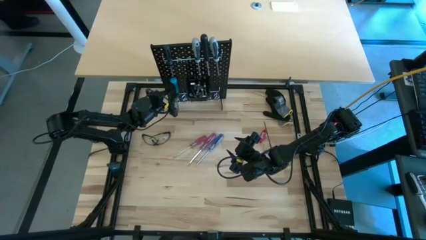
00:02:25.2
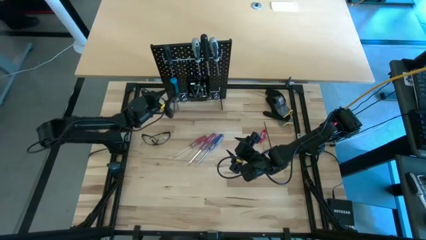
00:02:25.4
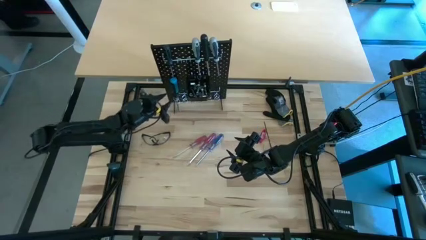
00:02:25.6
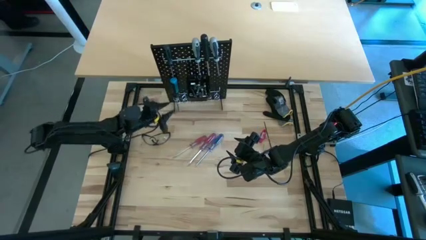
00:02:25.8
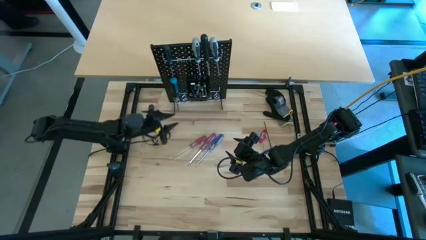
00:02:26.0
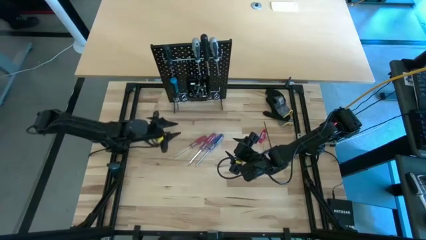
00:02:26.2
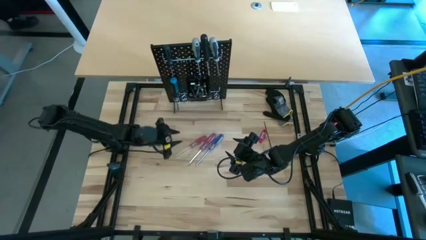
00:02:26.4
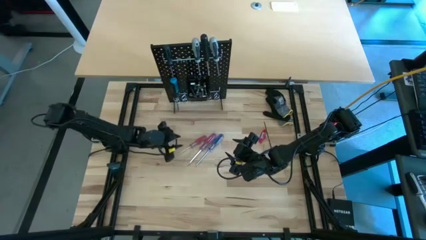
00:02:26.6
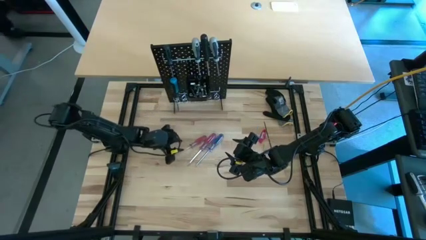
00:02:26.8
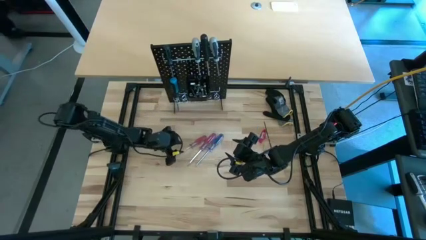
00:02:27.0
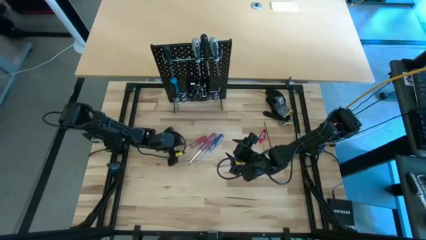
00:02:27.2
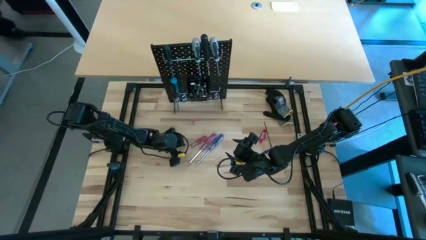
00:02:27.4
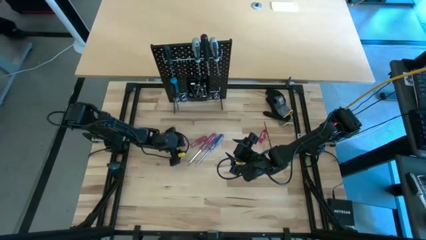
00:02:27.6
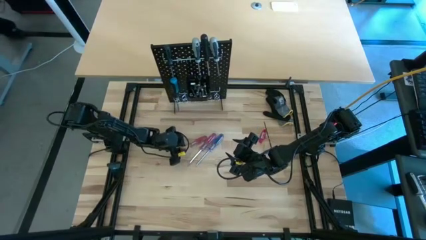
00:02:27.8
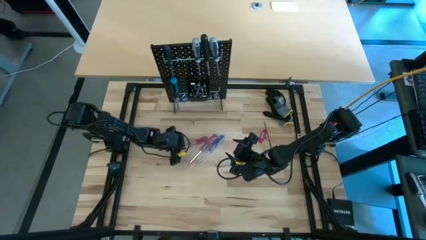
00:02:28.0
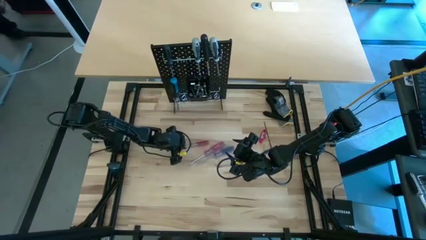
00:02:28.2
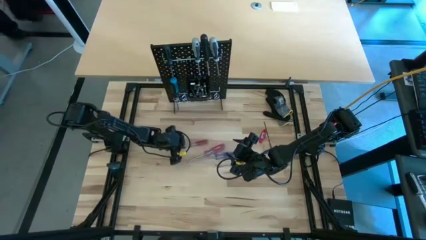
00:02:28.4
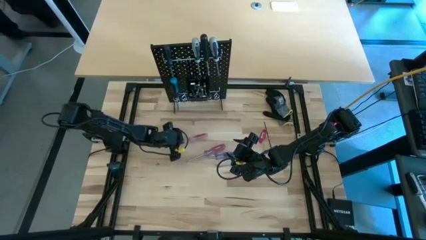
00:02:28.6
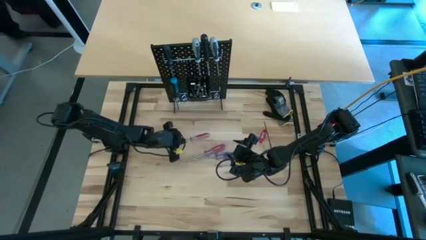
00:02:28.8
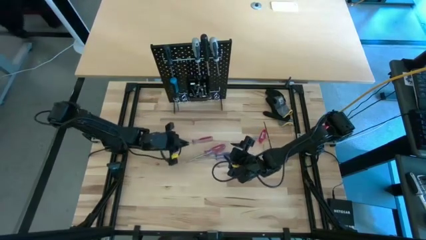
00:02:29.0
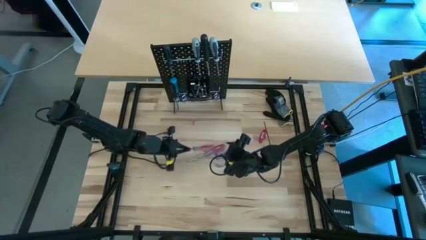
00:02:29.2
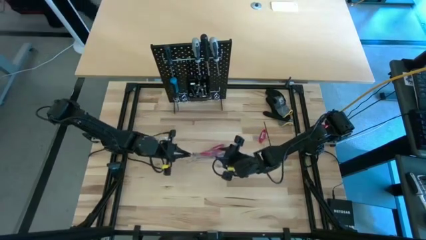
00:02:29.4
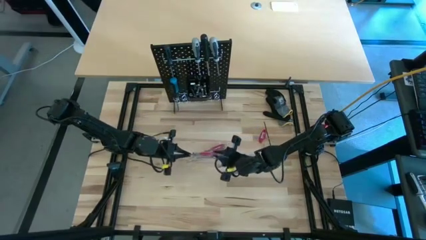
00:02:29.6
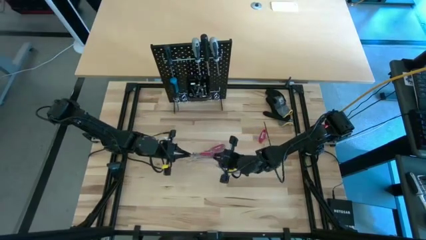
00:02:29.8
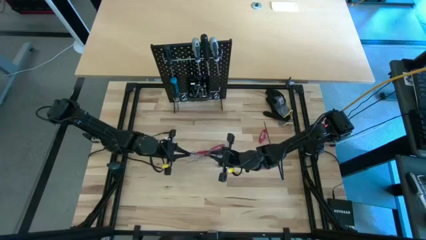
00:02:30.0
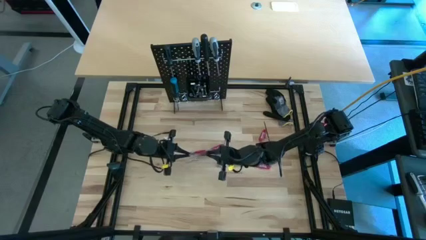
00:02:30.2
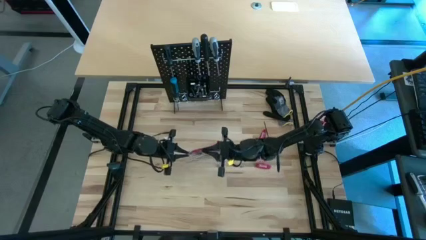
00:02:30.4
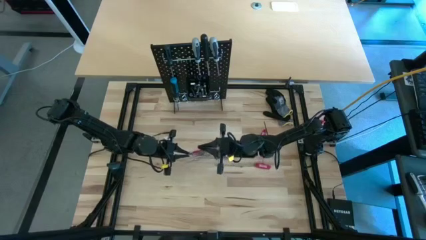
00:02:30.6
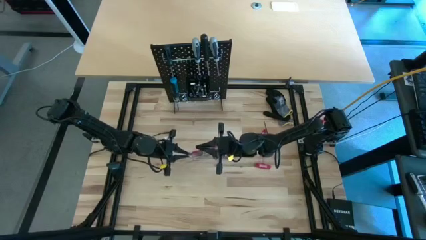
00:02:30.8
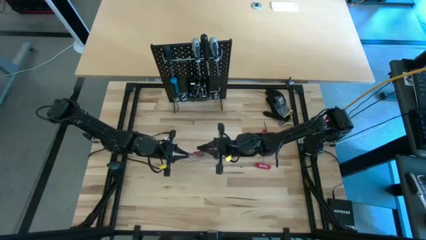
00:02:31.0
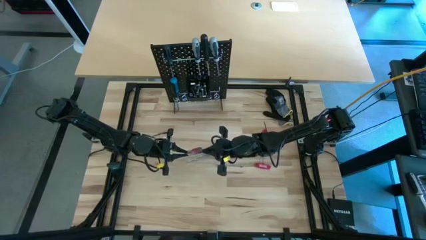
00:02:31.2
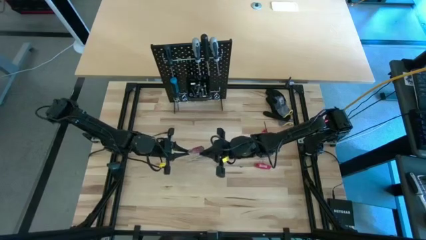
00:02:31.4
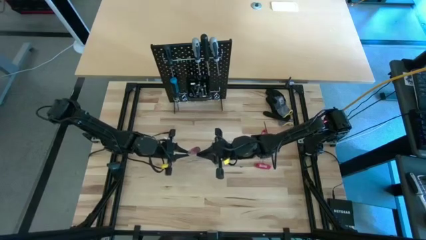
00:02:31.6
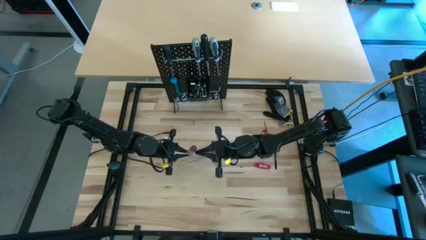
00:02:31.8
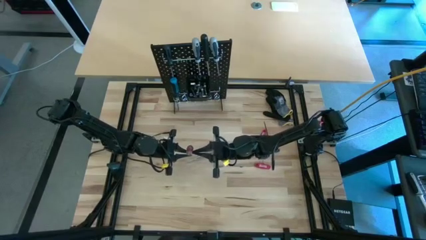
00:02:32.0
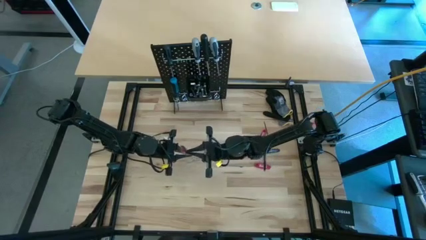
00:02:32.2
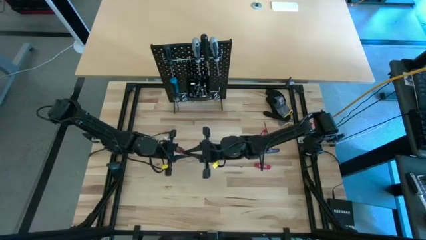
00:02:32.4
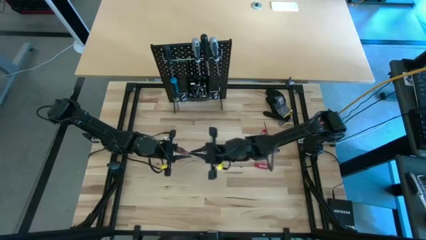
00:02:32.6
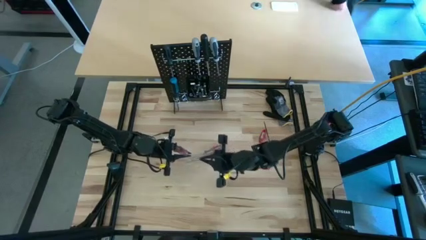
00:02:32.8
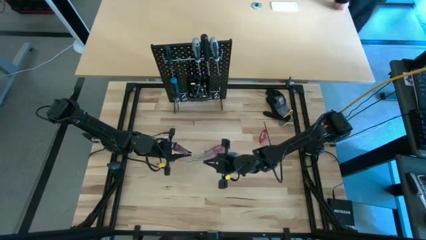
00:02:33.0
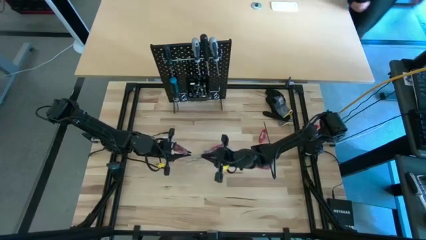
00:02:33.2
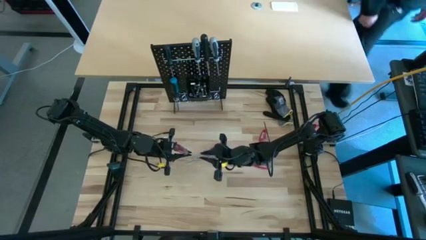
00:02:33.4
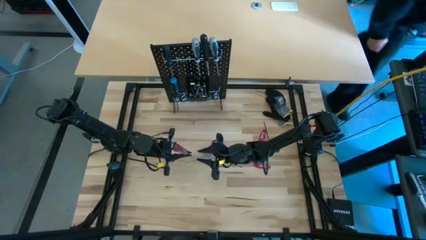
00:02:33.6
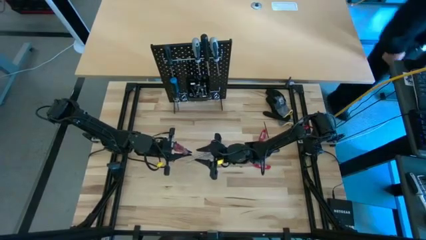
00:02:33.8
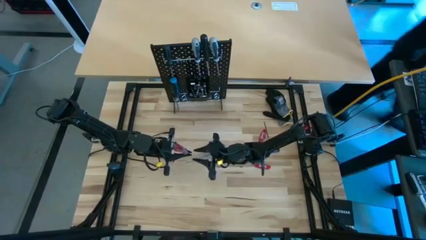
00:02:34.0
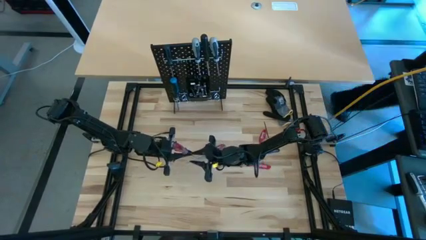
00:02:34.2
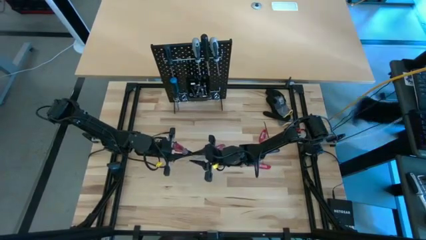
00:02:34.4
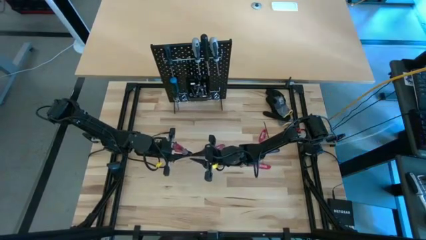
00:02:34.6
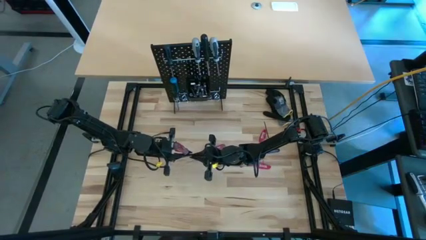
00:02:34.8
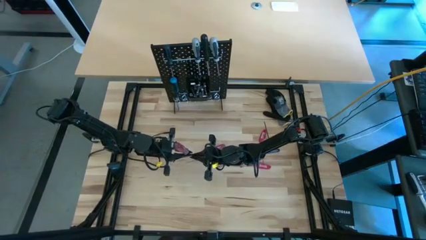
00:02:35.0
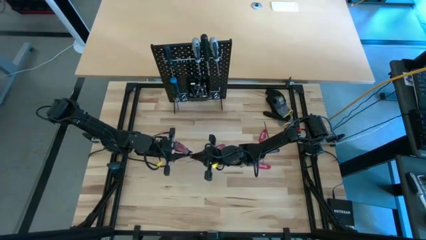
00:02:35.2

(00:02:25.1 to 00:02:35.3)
Task: Hang tools onto peg board
Hang the left red and transparent screwdriver on the peg board

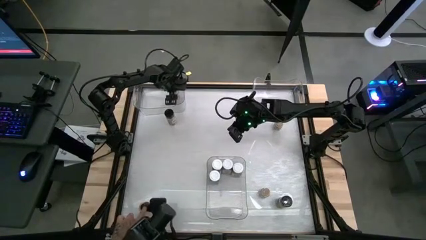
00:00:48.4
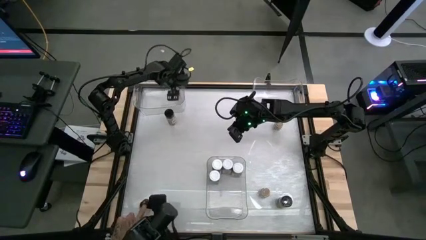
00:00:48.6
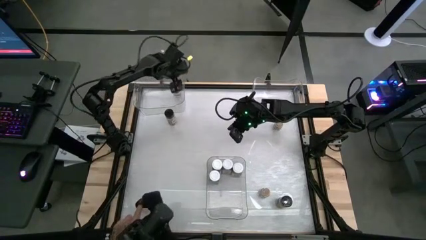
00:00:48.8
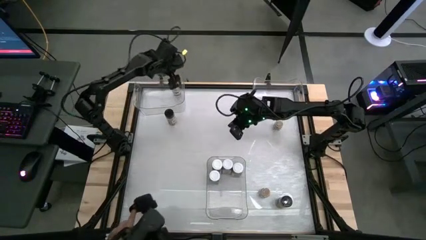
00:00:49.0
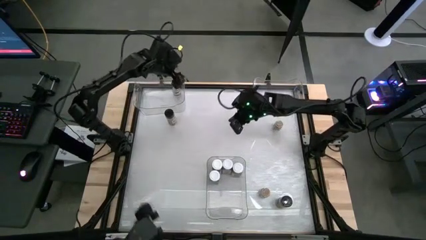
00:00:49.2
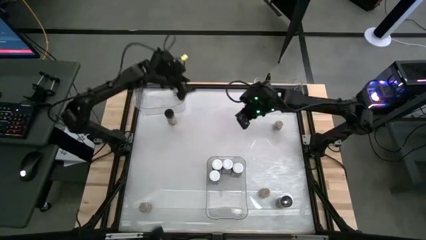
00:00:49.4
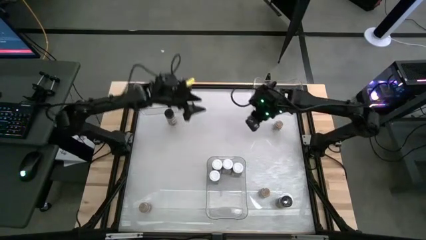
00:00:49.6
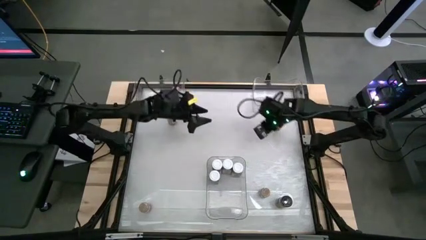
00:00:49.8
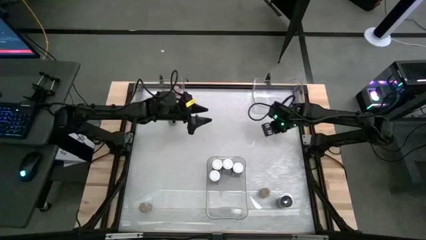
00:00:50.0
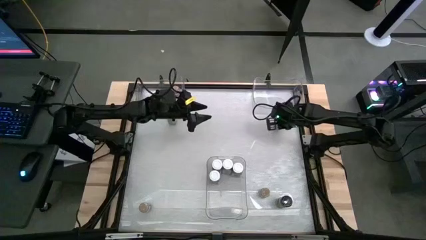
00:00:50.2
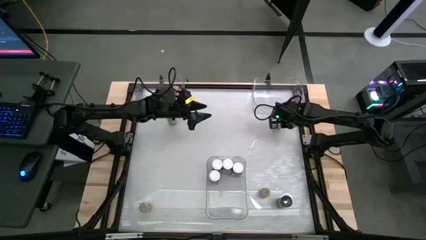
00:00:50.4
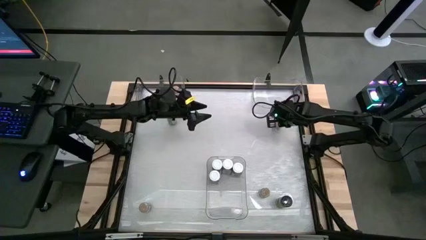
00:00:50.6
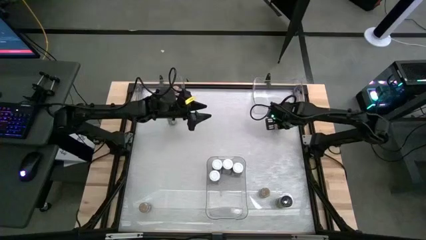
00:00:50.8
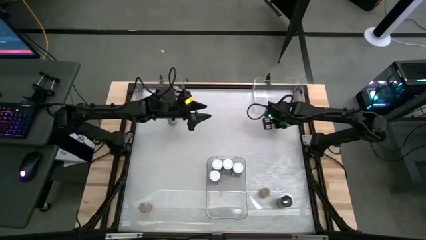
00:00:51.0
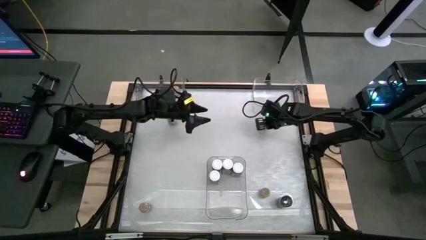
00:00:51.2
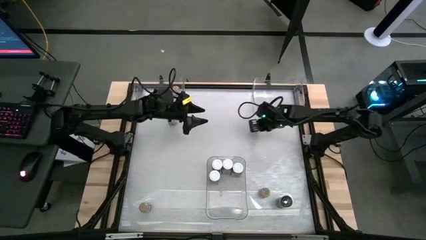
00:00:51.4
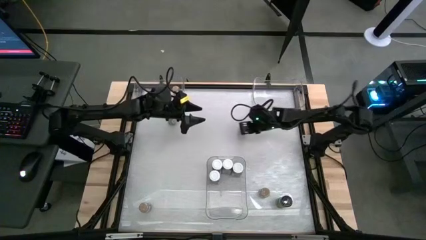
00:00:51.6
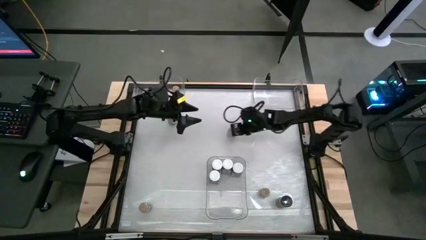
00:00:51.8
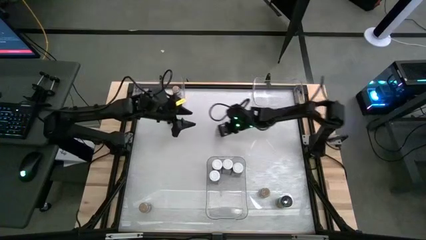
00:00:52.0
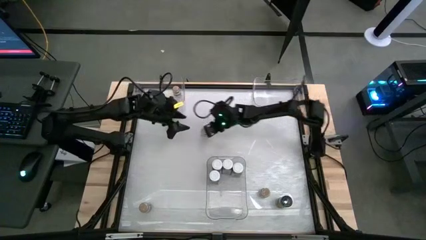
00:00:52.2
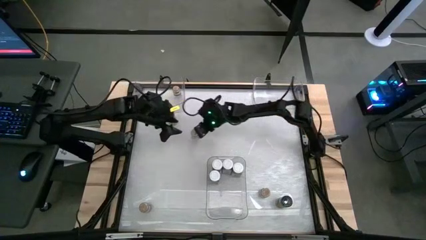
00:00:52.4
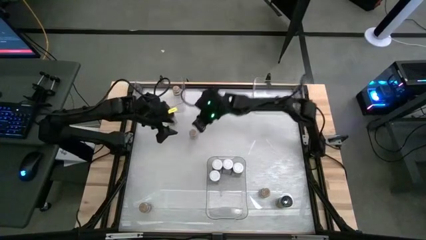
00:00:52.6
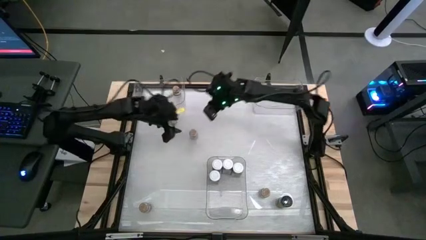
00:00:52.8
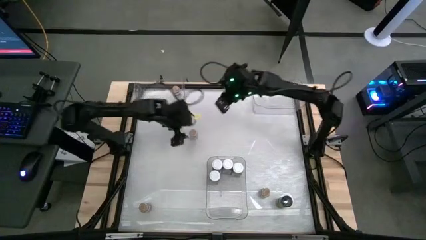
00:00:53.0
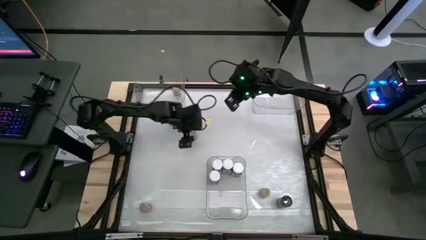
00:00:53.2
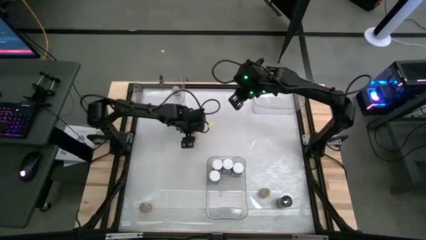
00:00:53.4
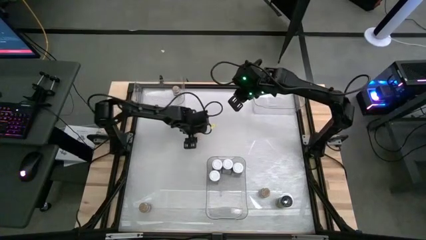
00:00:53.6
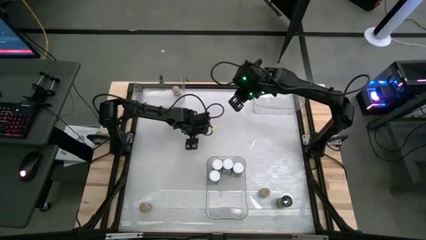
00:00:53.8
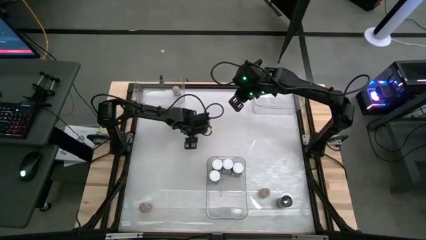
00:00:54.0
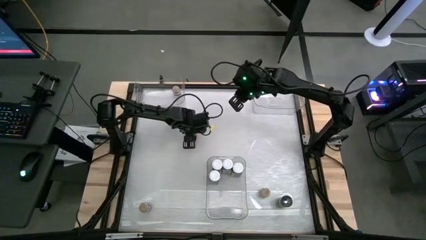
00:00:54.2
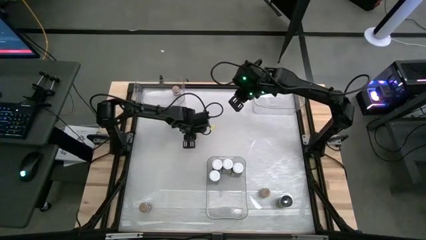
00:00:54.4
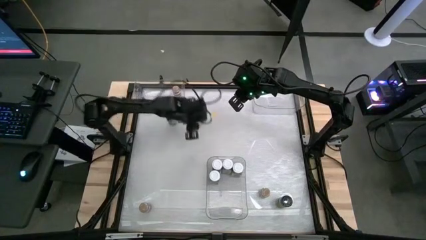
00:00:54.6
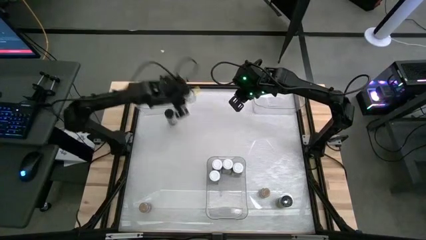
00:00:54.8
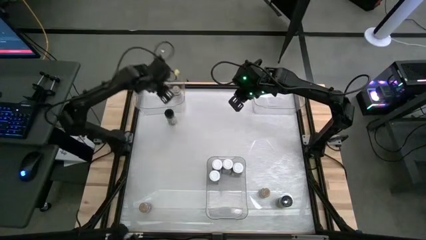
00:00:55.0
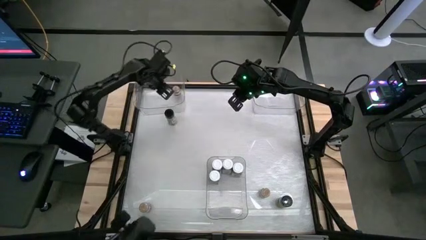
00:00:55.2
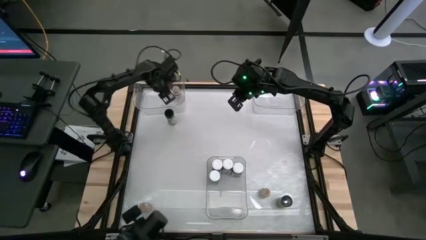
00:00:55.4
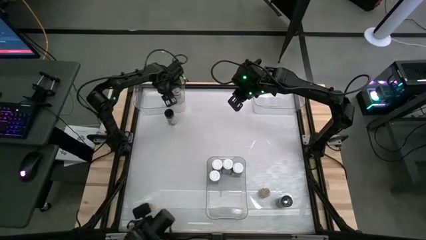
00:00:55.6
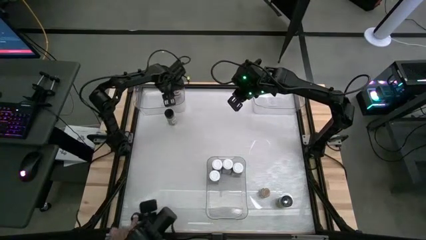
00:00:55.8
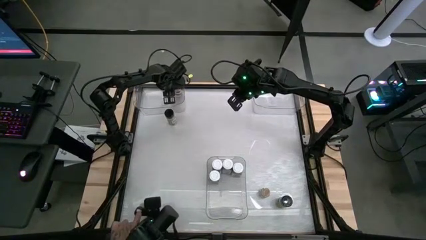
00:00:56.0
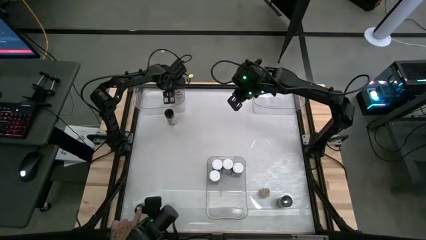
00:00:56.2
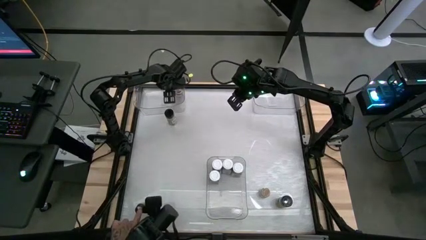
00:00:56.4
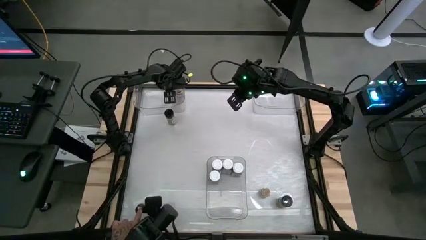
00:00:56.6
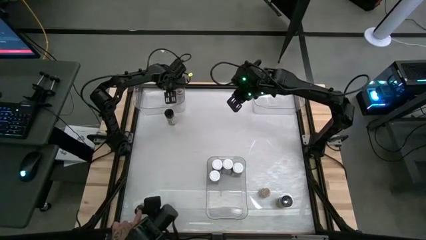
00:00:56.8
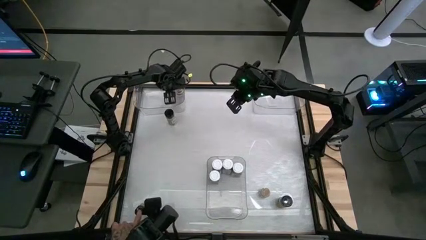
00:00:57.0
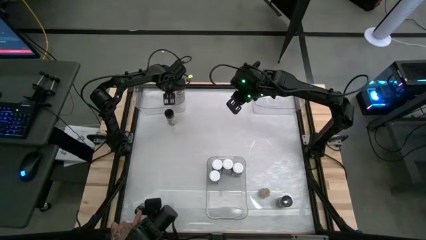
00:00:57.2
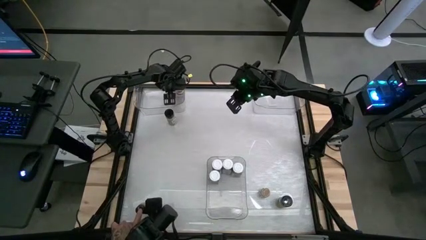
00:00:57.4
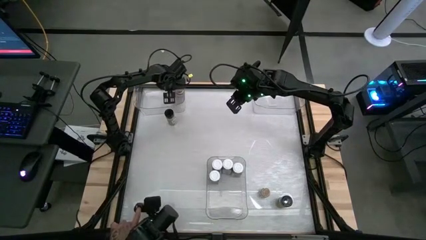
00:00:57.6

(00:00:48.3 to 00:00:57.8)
Task: Sort spices by type
Put the top right brown seasoning bottle into the top left transparent bin
